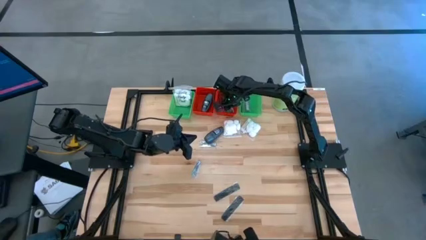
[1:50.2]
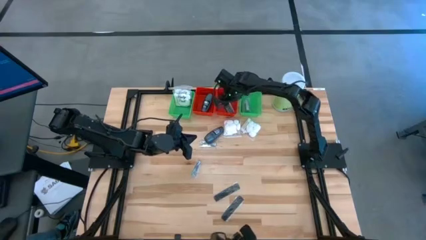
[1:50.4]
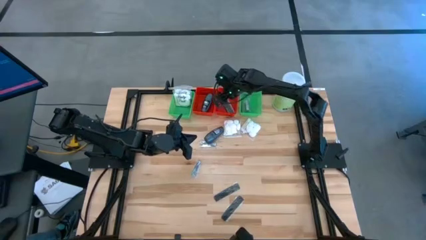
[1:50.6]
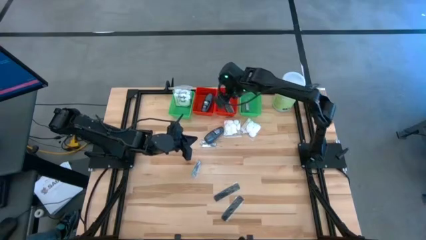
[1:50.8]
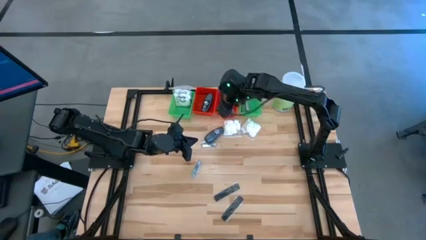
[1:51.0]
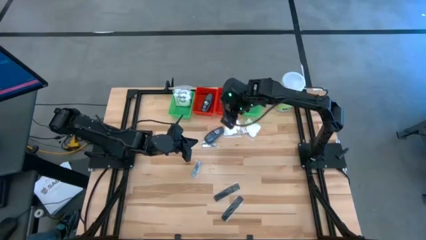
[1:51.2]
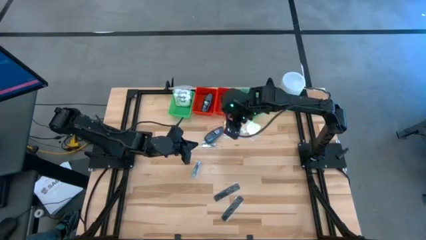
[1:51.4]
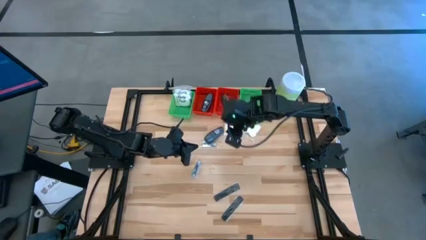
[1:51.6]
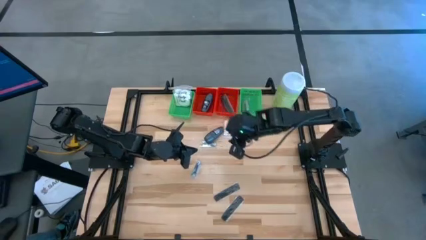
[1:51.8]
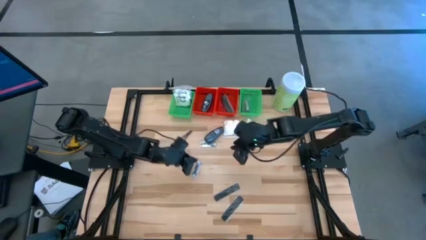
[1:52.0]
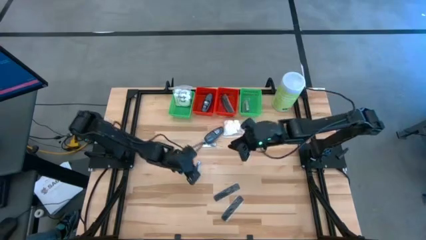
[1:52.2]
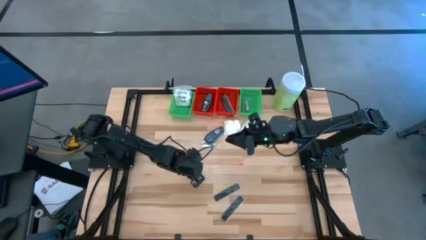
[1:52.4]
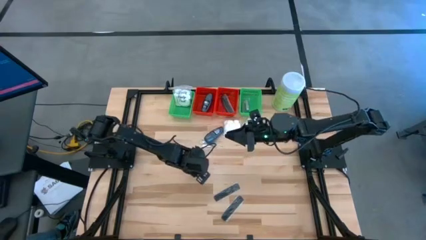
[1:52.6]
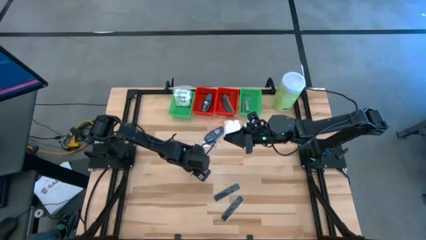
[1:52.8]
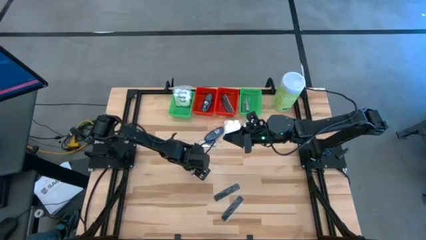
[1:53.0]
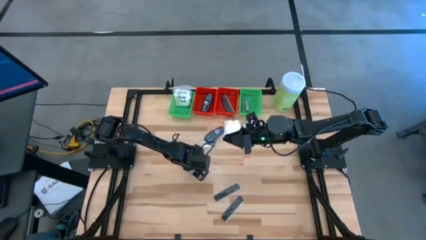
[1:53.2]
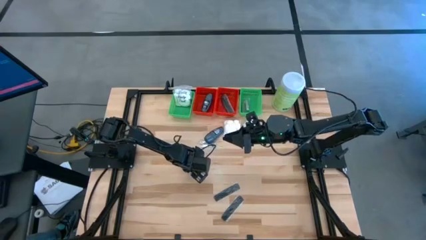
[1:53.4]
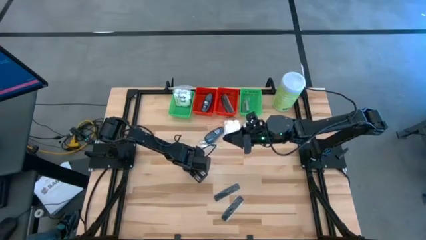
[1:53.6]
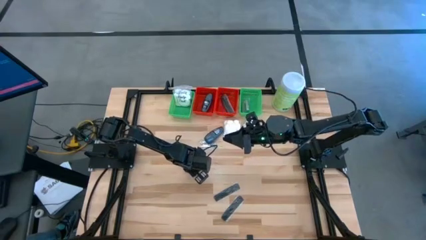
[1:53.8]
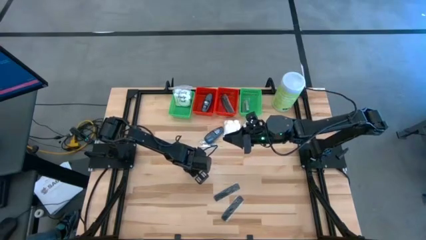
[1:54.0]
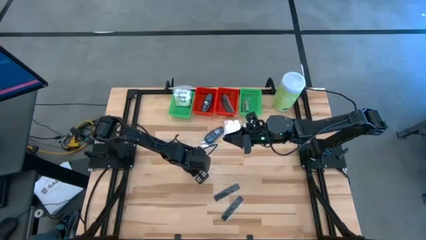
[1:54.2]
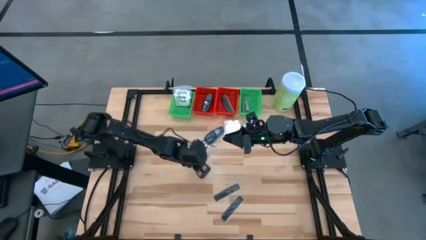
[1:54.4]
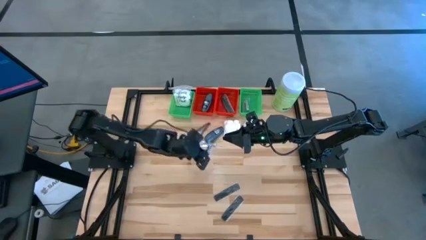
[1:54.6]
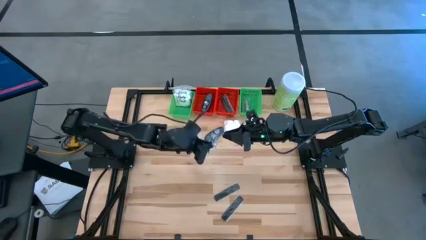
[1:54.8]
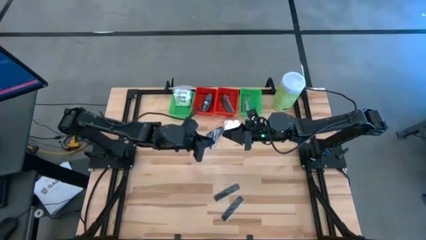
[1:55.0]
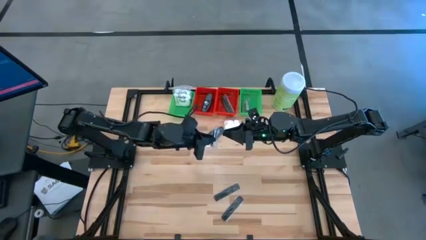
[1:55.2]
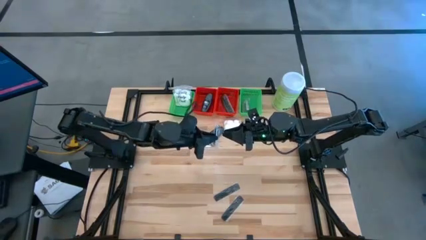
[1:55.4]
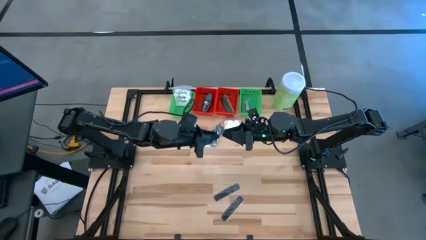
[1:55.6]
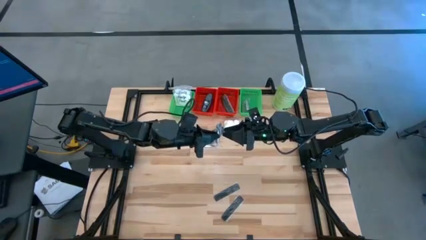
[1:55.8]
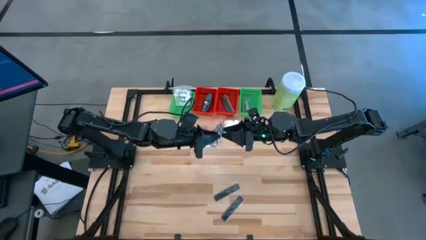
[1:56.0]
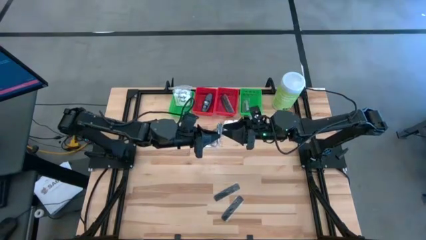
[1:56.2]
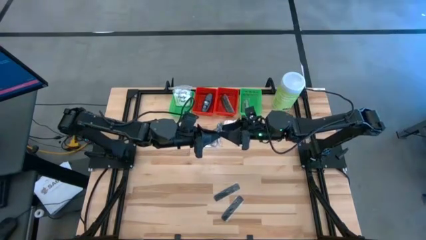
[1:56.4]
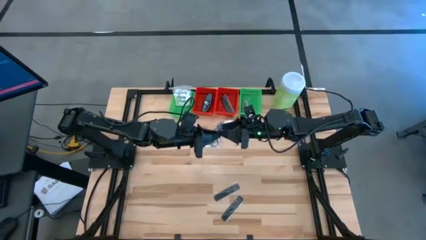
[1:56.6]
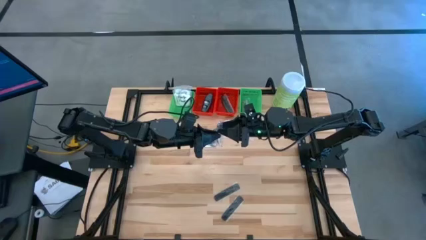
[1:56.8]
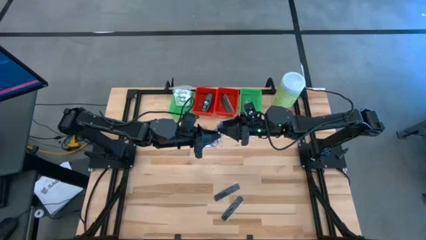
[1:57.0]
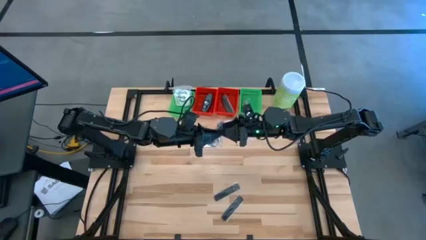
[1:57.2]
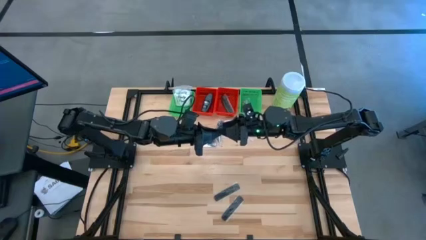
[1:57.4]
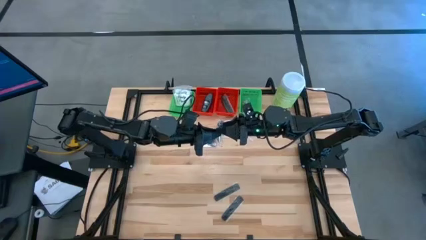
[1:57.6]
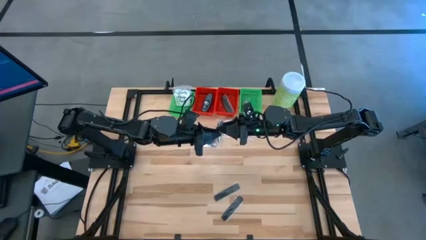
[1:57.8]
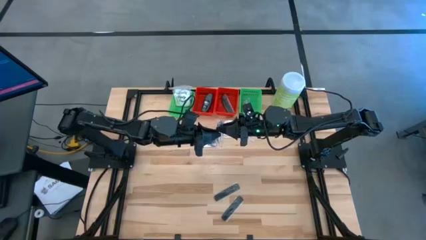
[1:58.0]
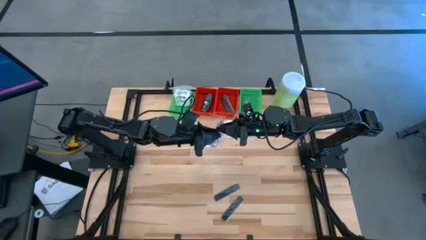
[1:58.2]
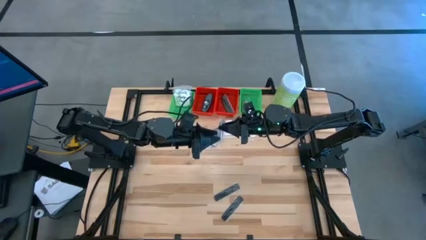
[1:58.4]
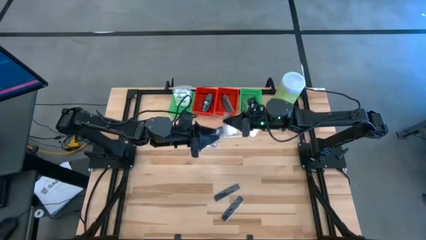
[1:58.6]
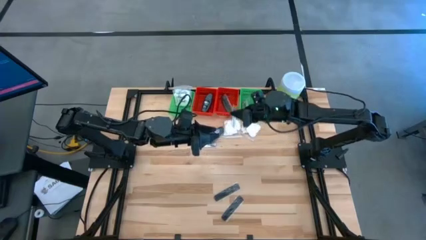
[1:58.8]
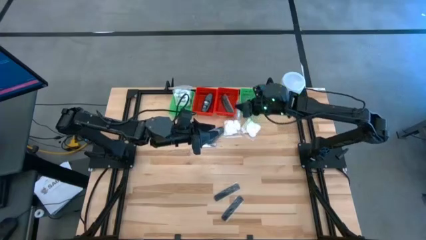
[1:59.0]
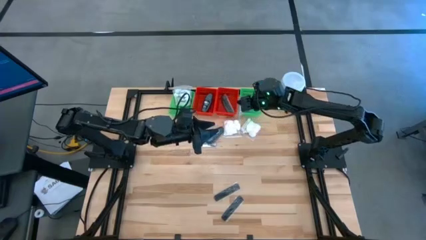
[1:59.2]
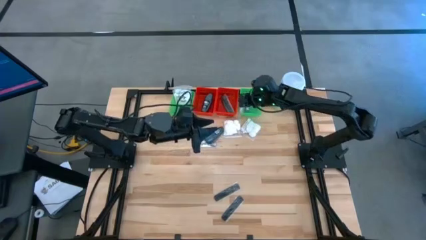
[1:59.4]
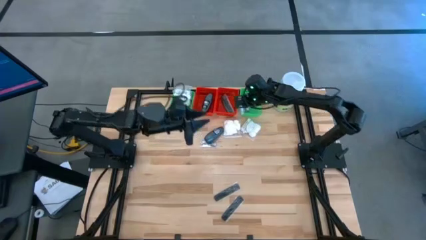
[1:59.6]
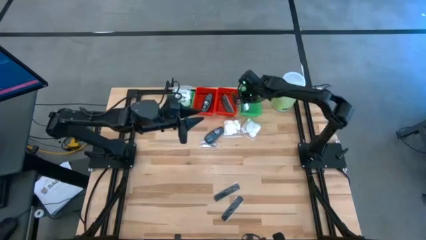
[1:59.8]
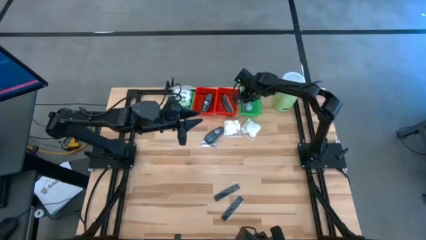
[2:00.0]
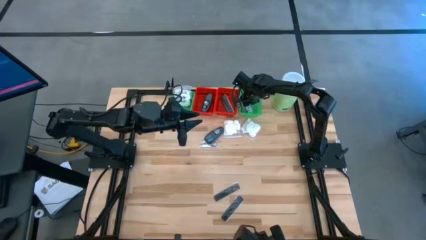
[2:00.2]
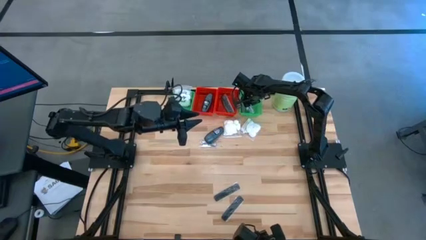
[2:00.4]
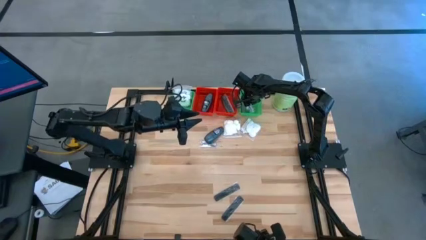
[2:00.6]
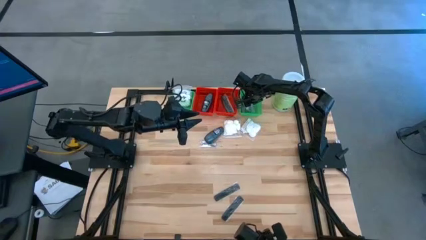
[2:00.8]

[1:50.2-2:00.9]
Task: Pick & Place Travel size toiletries
Put the nail cutter into the right green basket

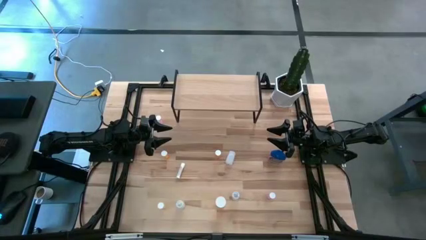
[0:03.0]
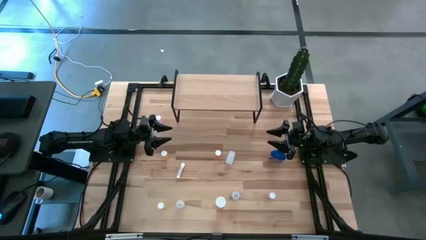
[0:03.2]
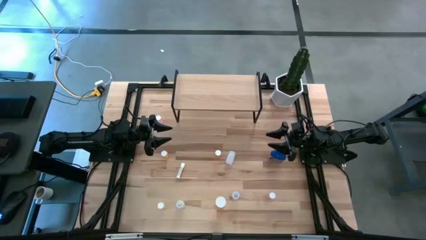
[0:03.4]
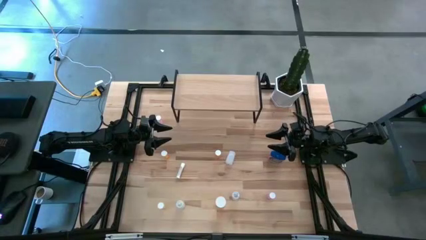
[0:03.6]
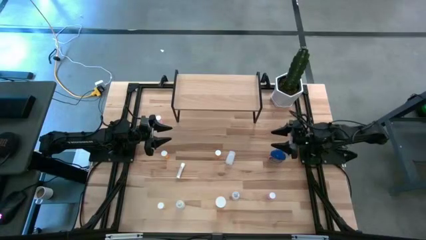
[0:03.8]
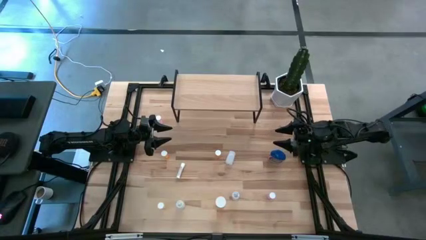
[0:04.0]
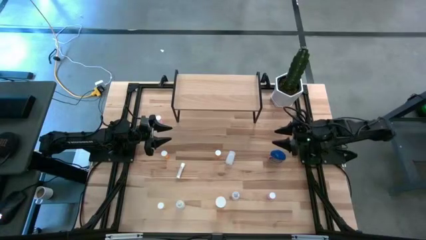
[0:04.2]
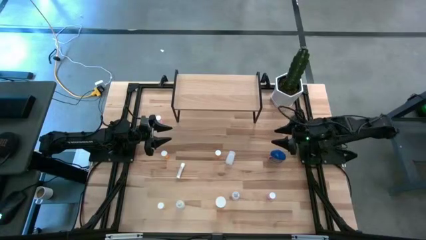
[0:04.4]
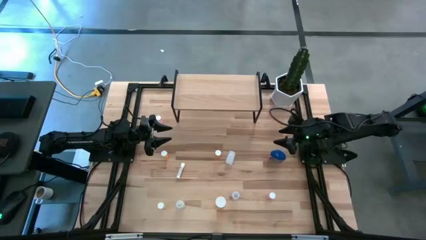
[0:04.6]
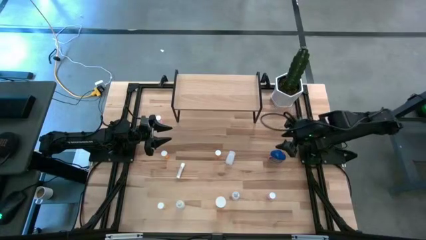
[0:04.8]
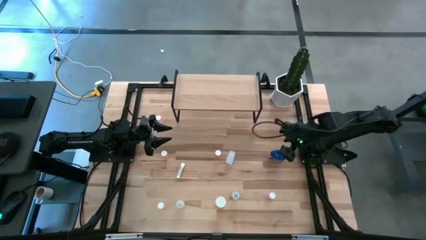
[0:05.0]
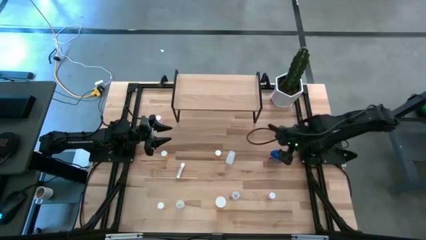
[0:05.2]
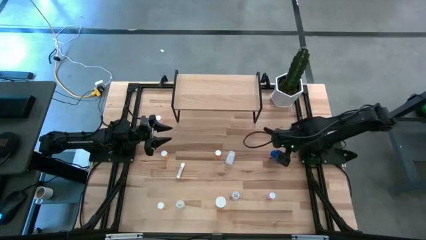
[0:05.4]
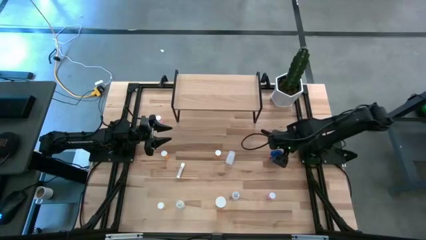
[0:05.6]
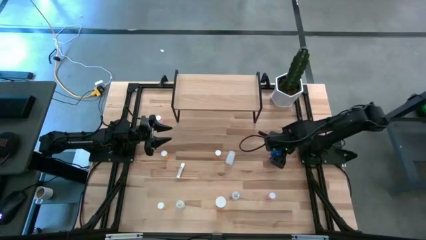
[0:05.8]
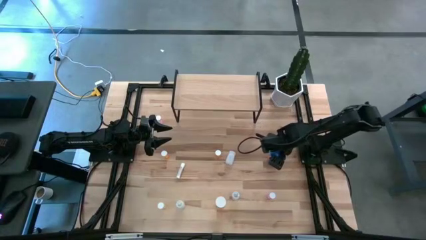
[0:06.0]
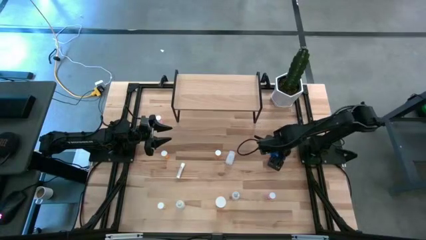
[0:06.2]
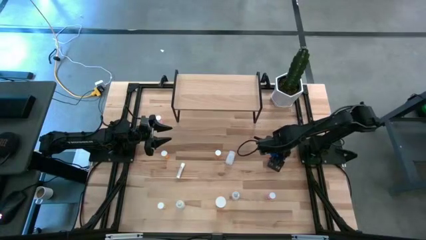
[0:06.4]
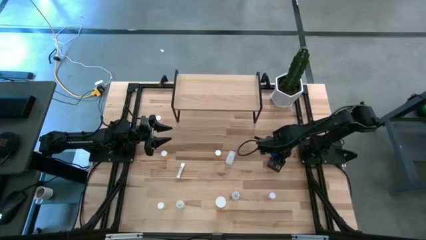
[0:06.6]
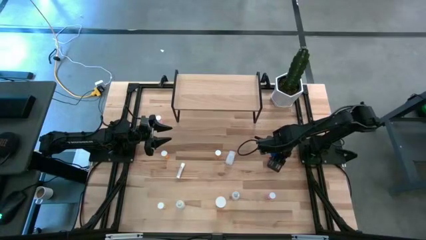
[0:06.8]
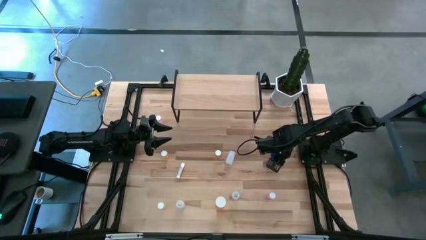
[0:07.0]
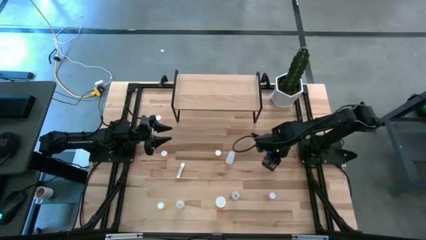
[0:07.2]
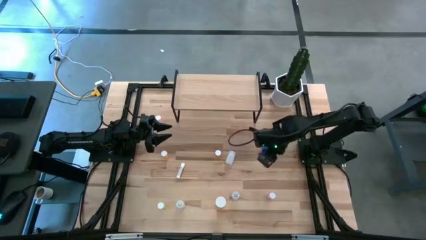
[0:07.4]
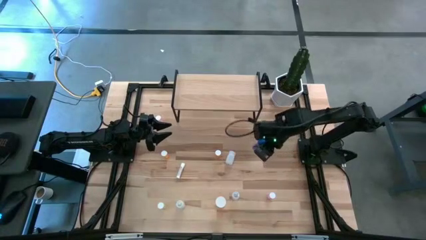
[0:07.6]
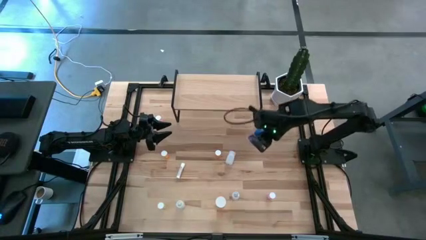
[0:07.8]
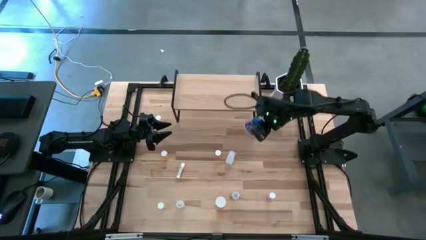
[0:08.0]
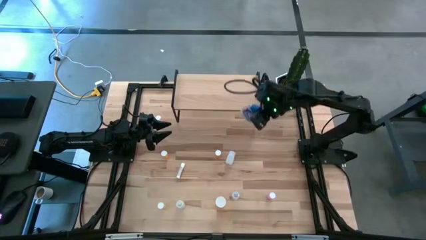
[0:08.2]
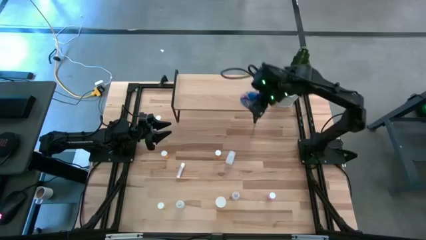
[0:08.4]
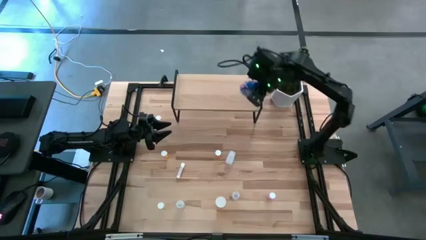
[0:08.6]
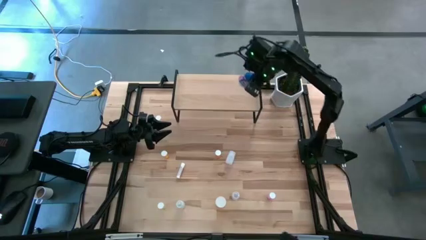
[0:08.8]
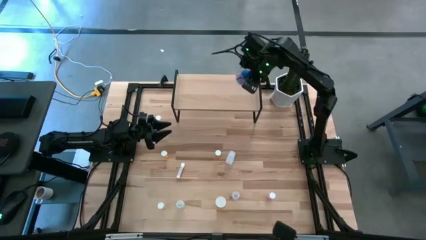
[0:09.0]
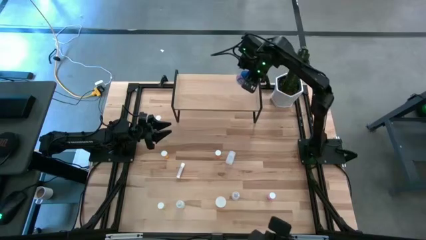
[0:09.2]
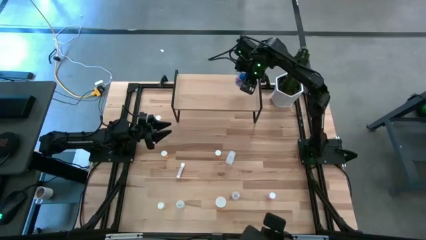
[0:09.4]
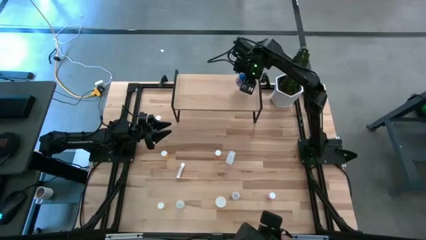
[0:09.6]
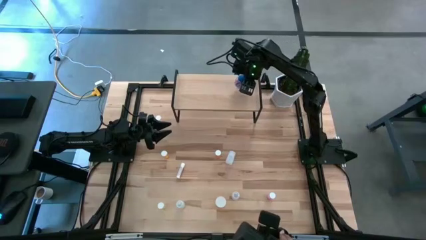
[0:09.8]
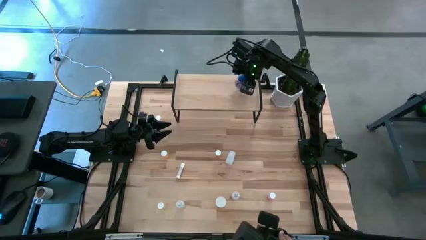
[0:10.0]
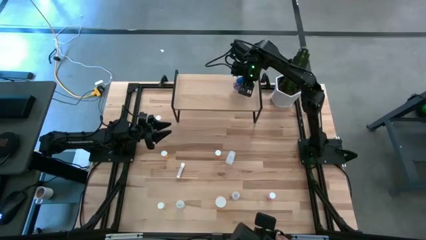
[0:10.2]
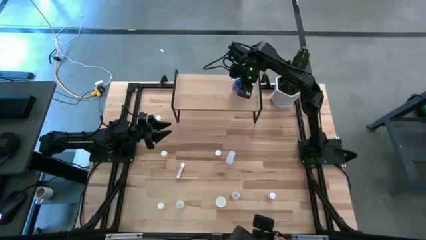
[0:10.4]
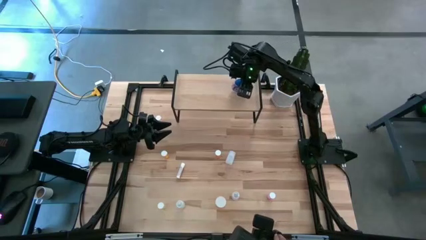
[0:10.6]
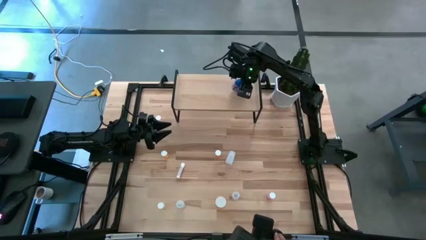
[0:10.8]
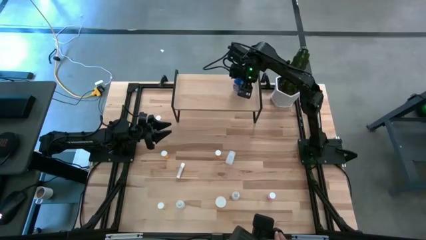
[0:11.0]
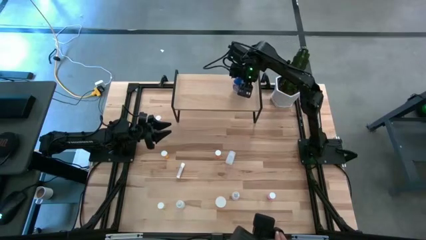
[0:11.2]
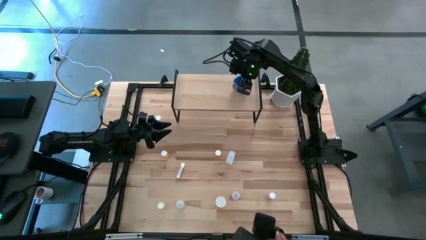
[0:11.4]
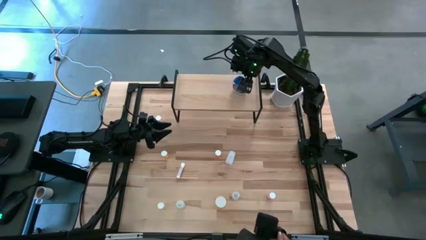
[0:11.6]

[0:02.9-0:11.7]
Task: Pick and place medicine bottles onto shelf by color
Put the blue pill bottle on the shelf
